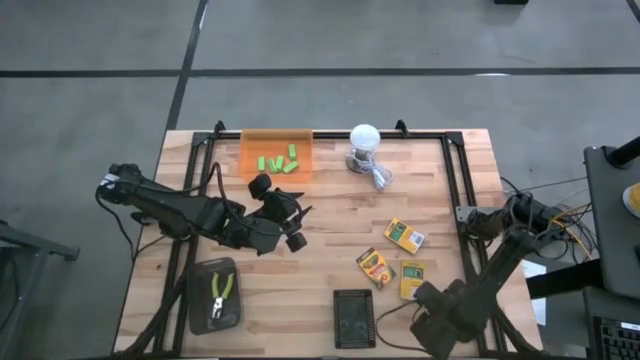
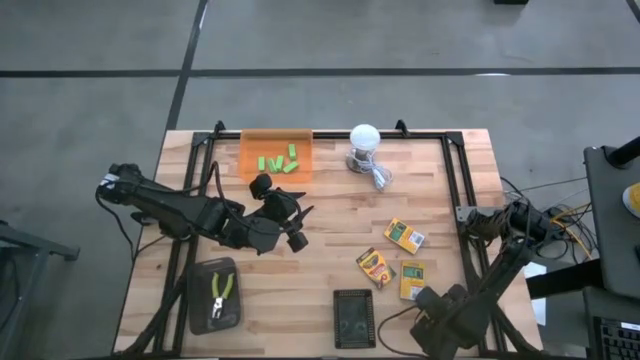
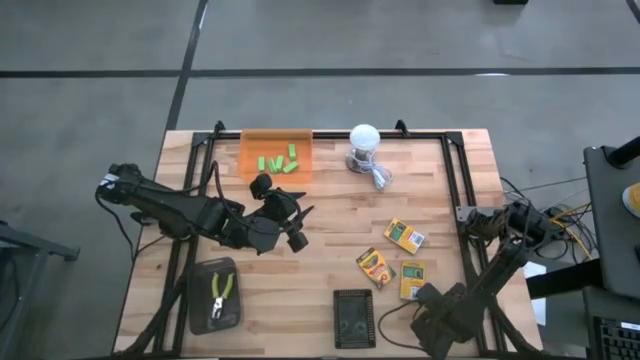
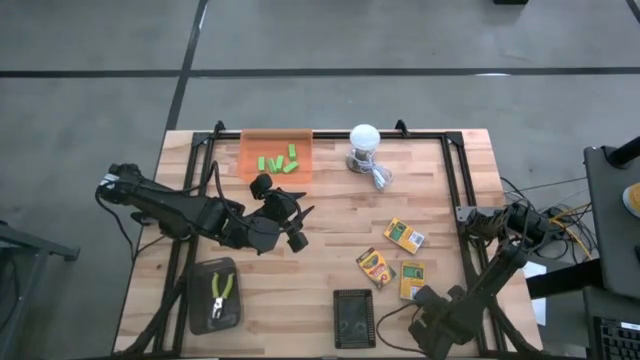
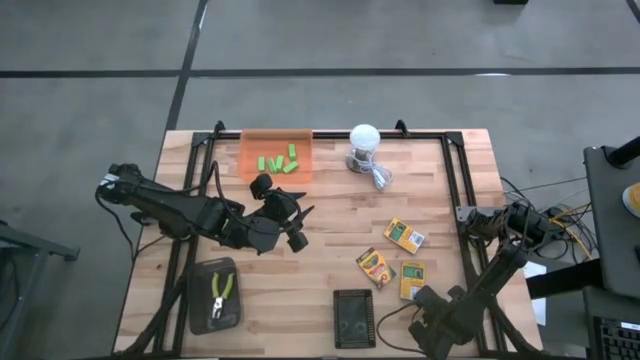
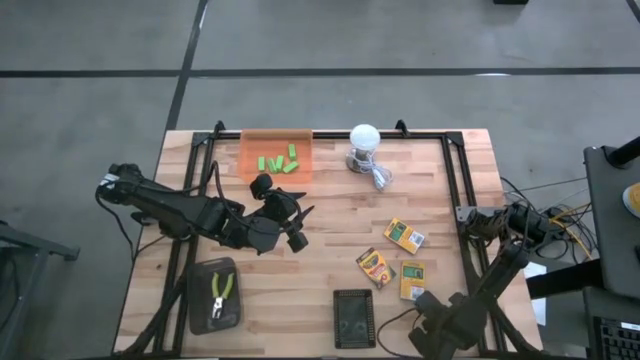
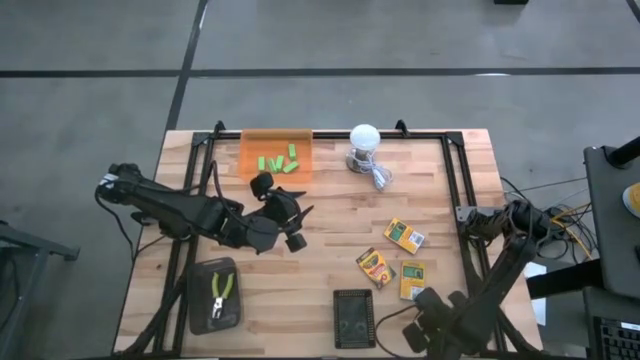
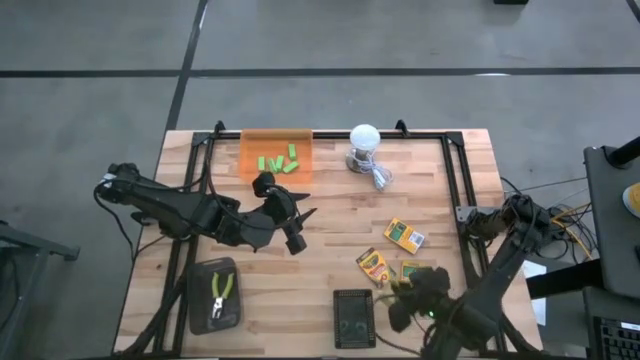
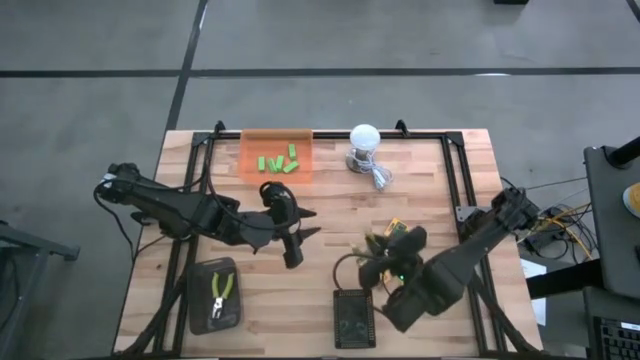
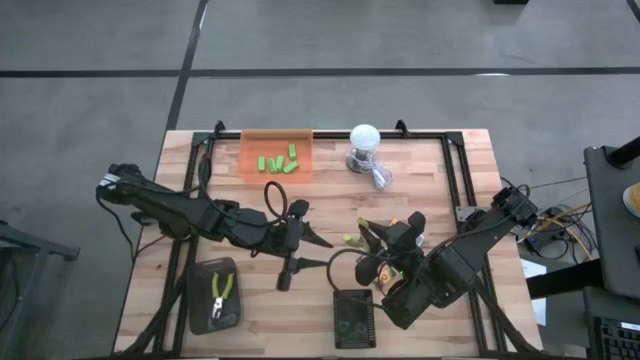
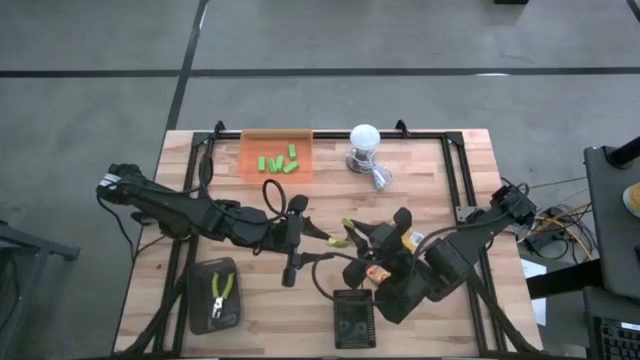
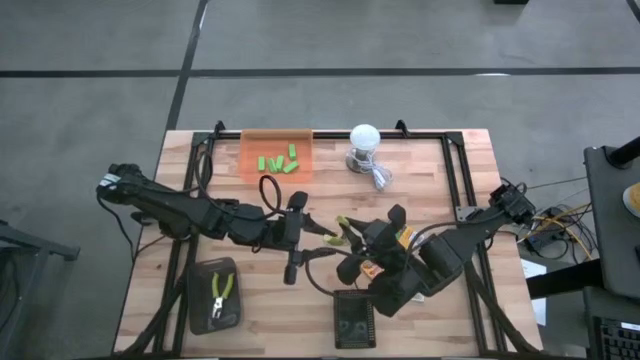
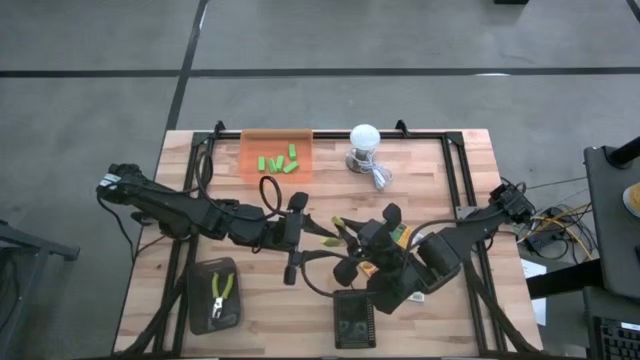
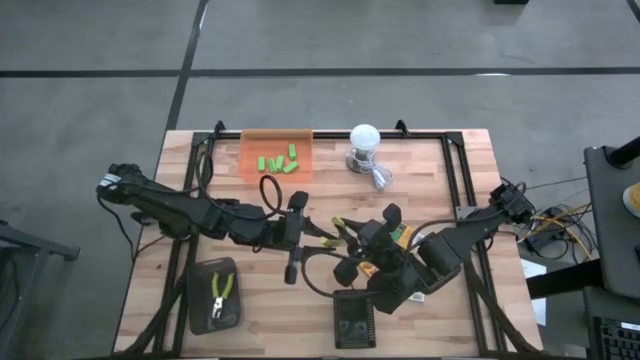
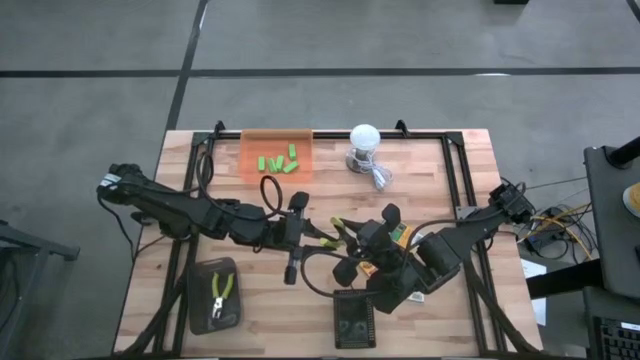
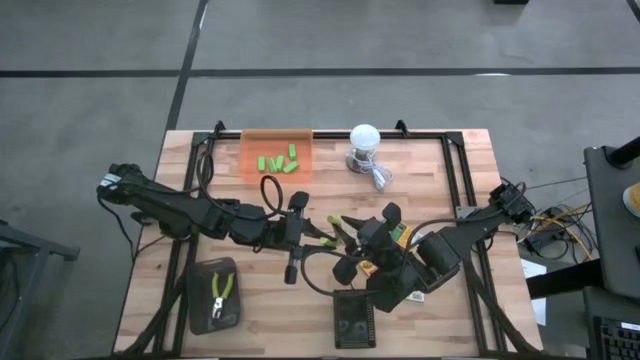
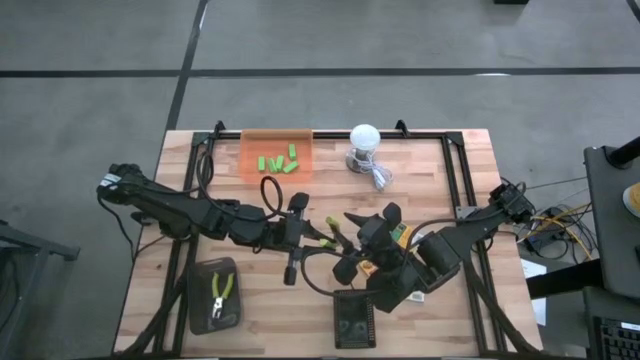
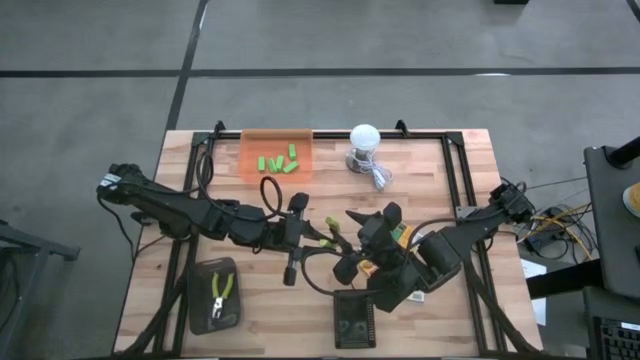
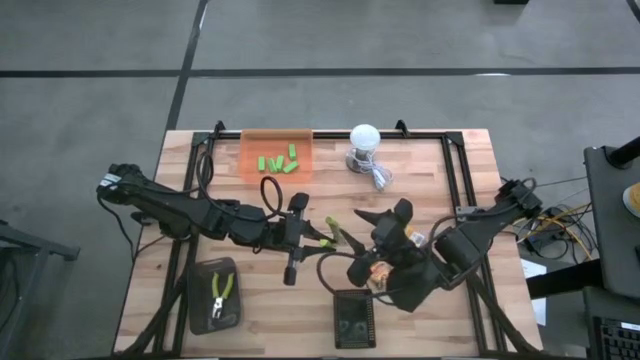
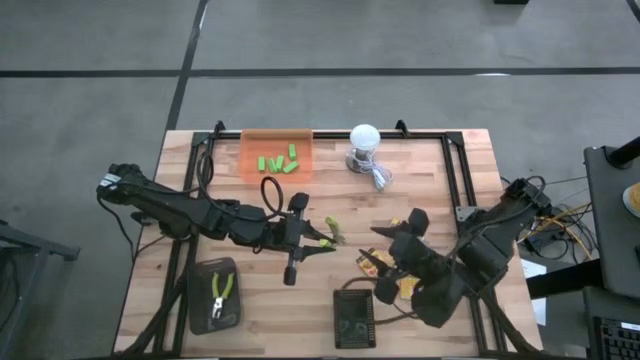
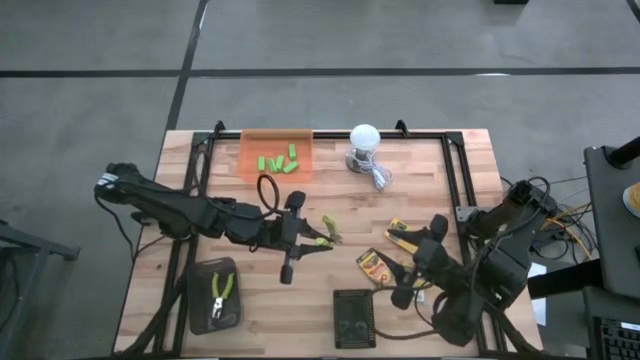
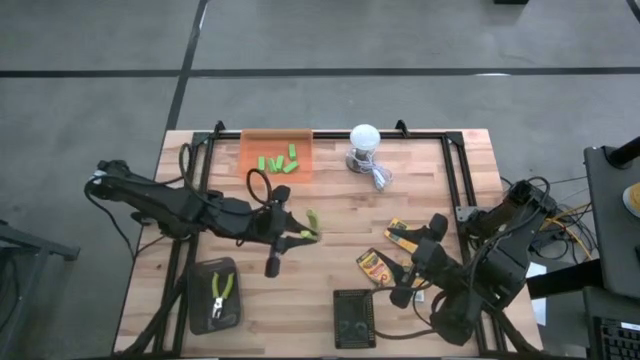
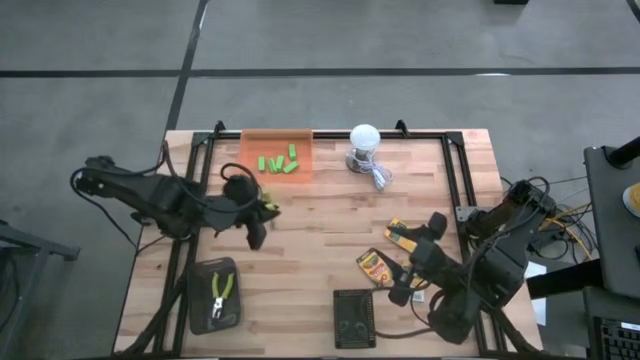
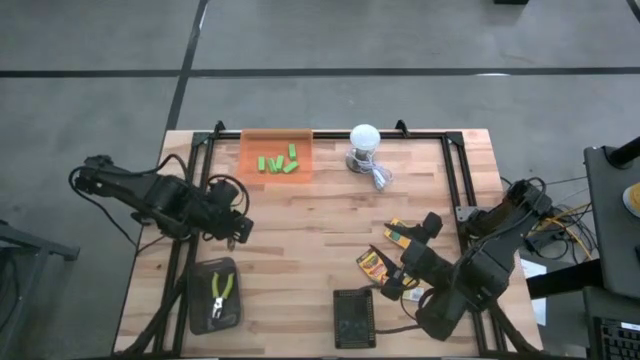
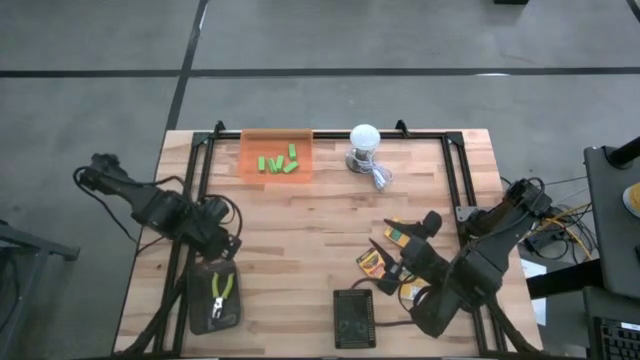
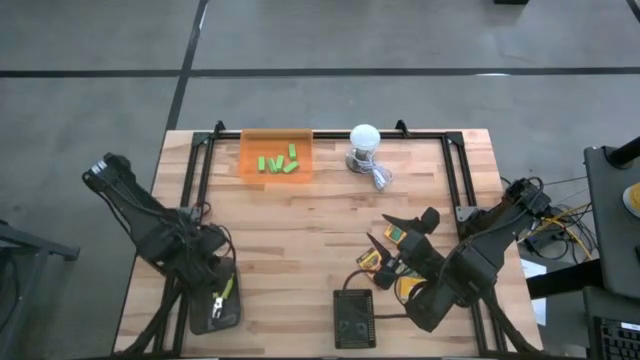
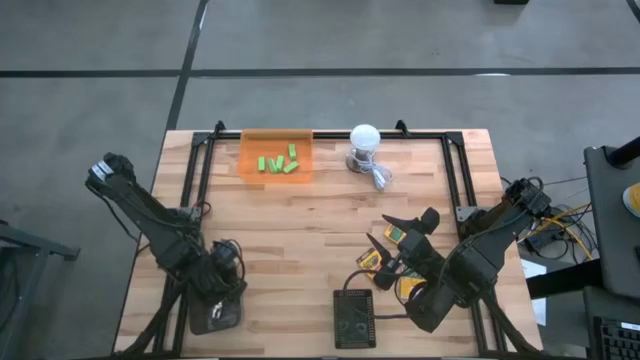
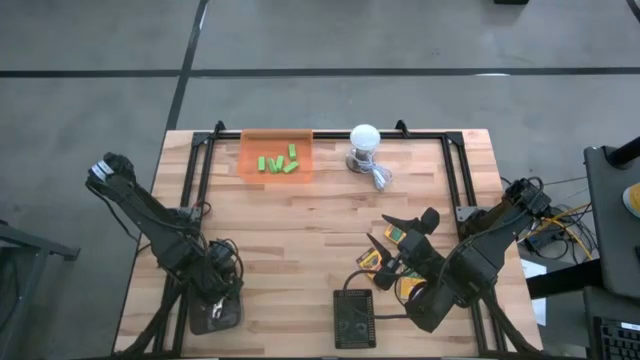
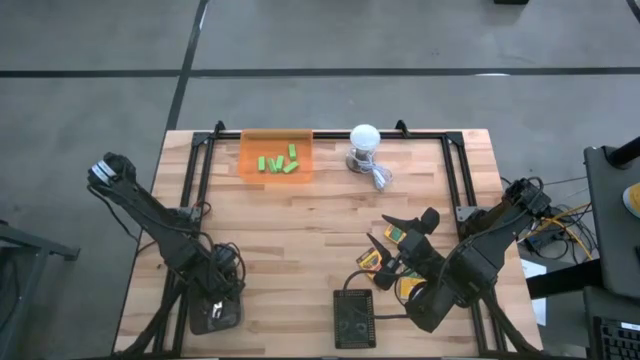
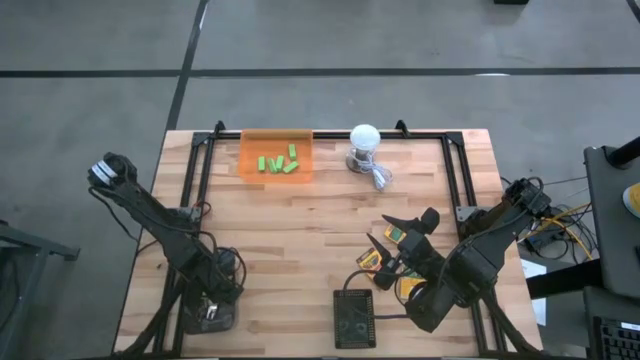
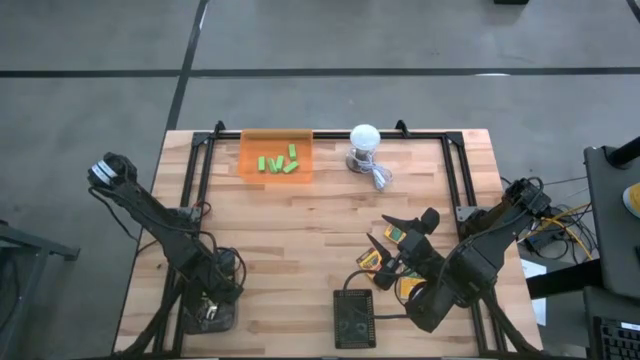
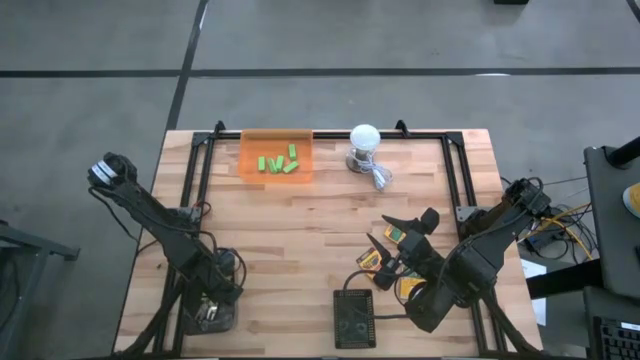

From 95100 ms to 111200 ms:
Task: Pick & Place School Supplies
Put the green hole puncher into the left black bin
